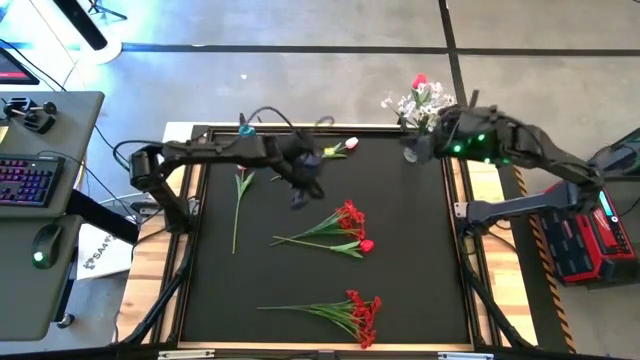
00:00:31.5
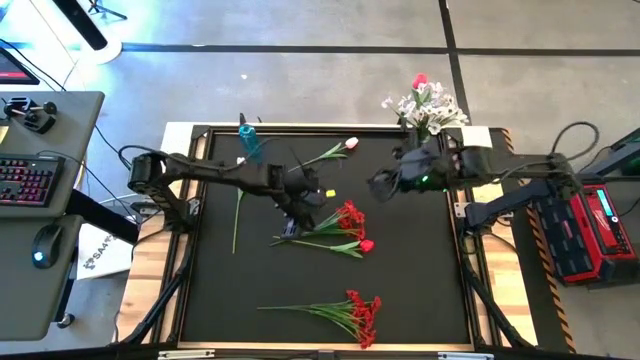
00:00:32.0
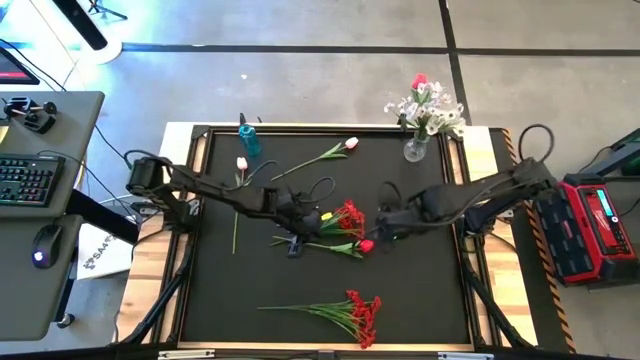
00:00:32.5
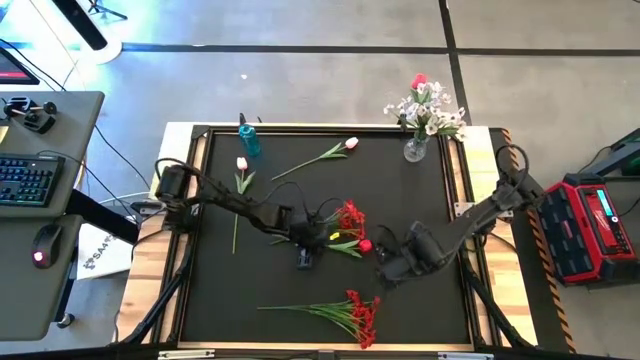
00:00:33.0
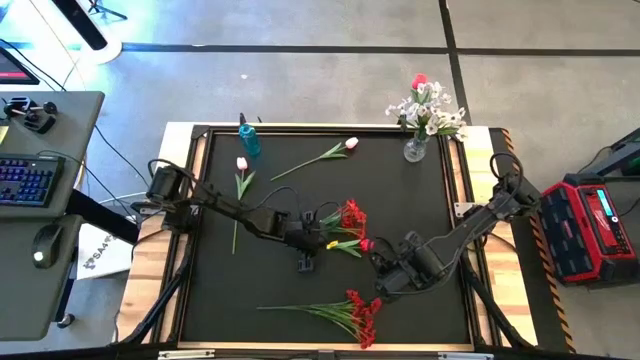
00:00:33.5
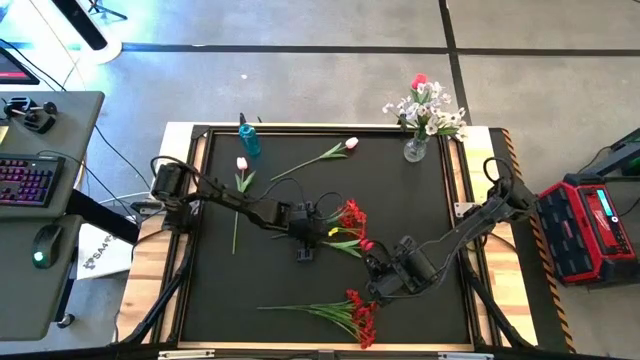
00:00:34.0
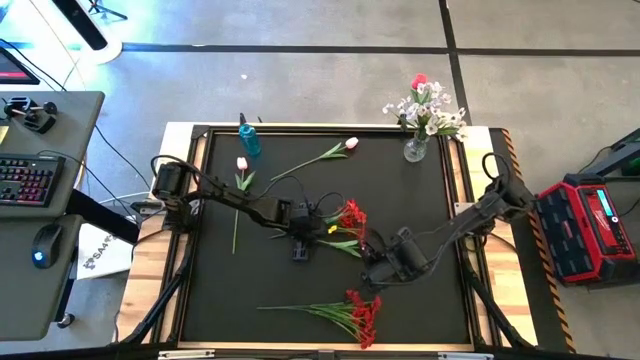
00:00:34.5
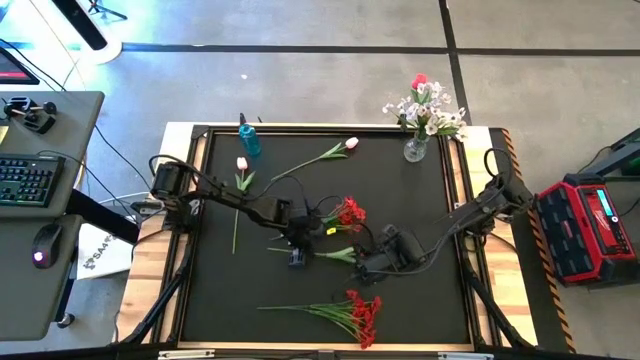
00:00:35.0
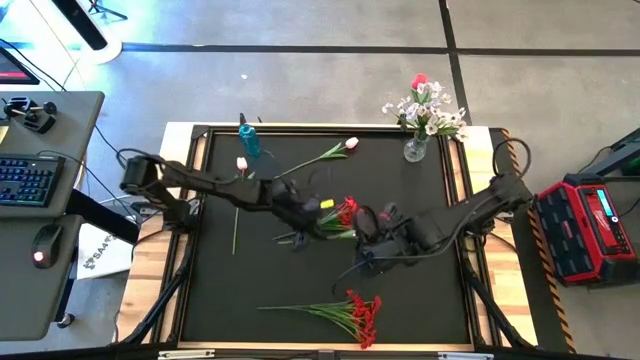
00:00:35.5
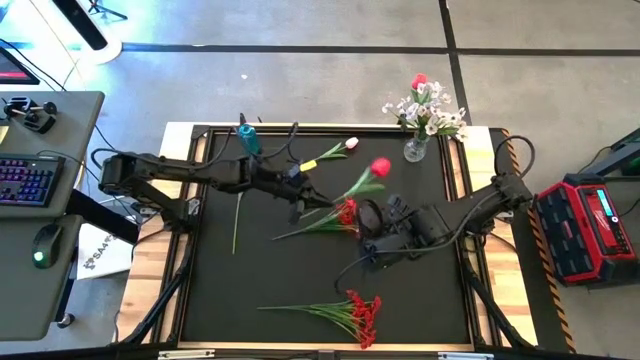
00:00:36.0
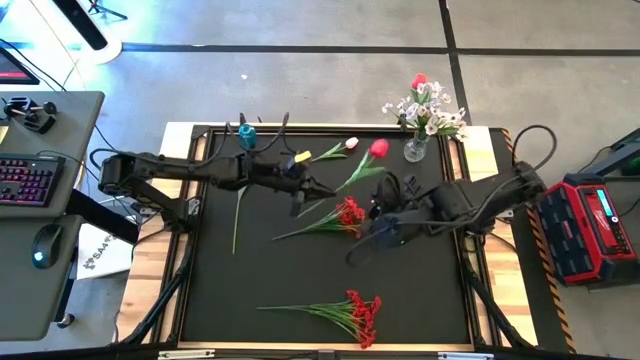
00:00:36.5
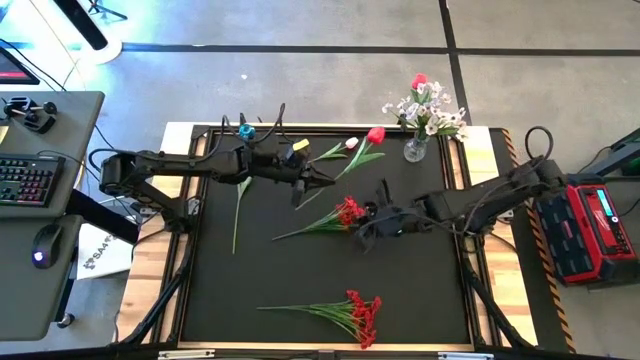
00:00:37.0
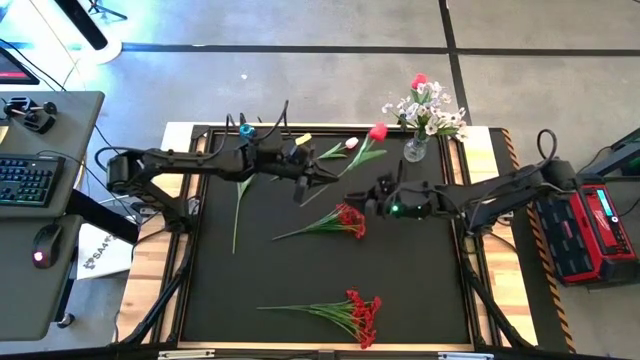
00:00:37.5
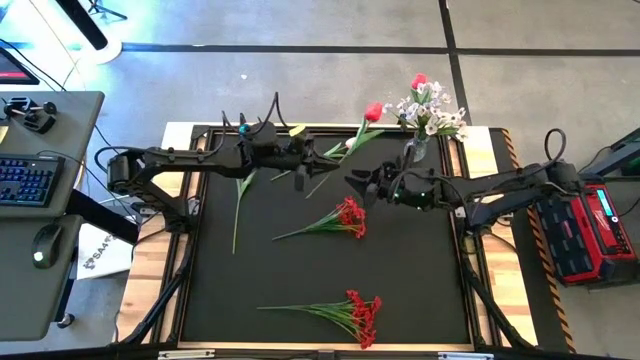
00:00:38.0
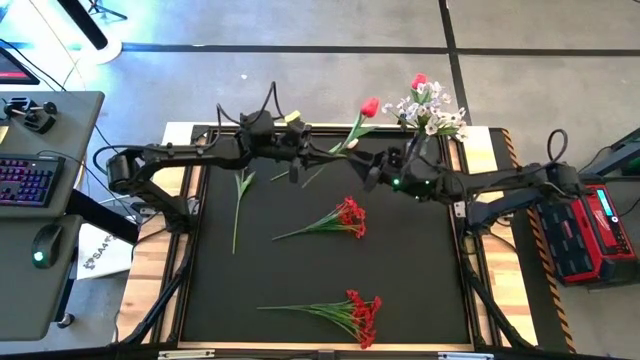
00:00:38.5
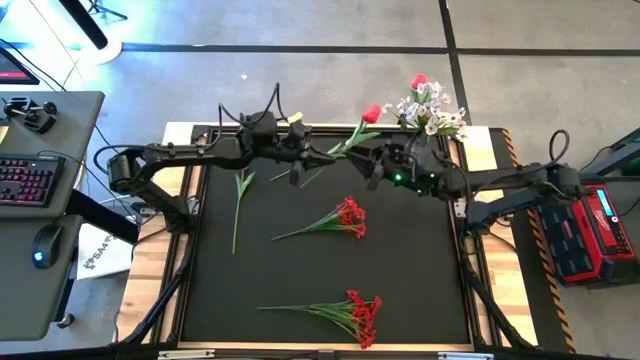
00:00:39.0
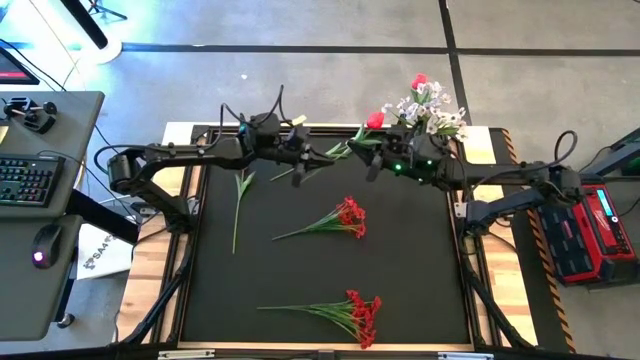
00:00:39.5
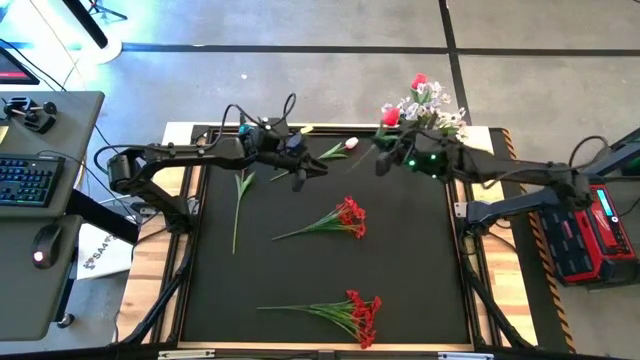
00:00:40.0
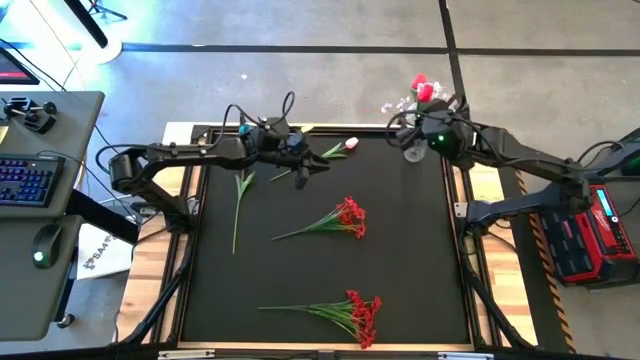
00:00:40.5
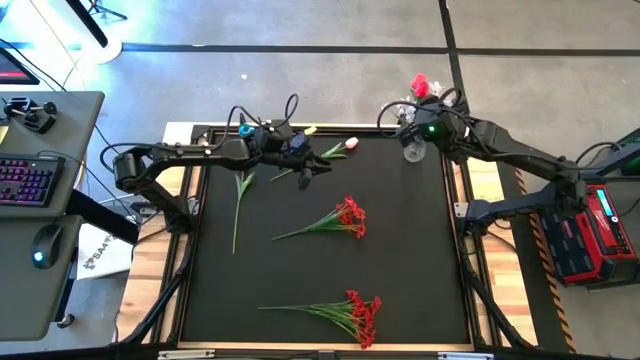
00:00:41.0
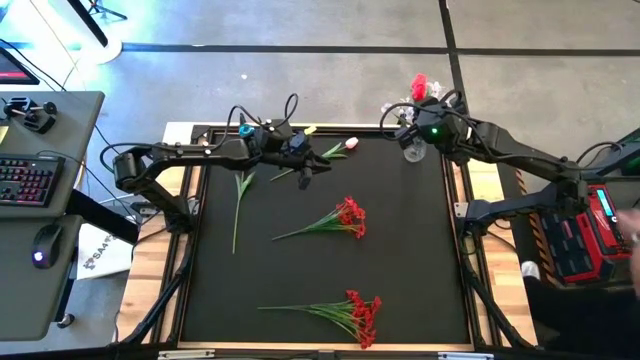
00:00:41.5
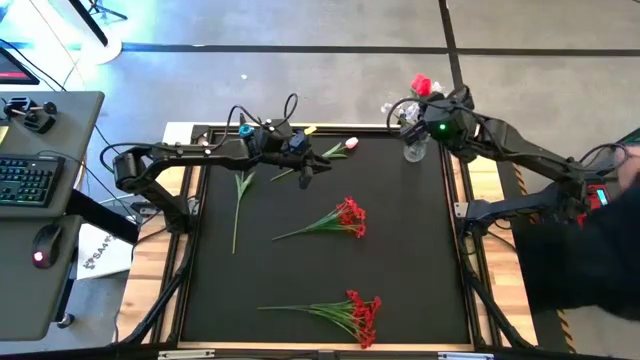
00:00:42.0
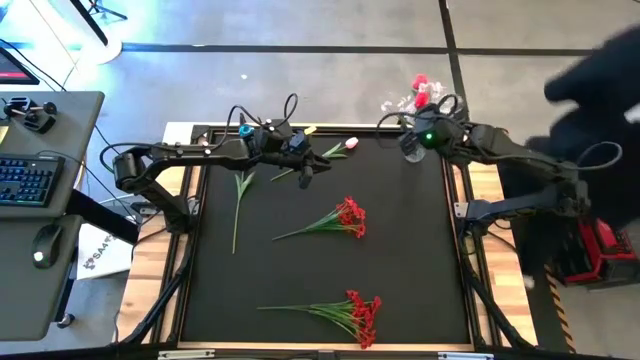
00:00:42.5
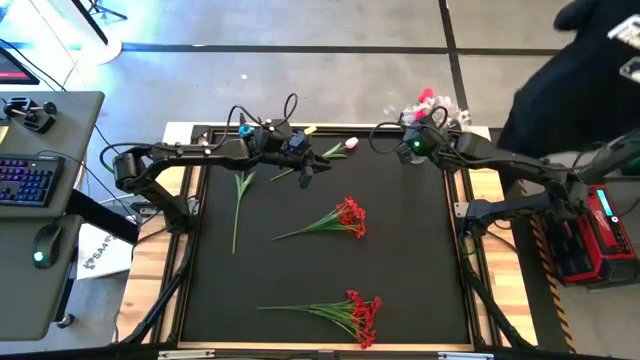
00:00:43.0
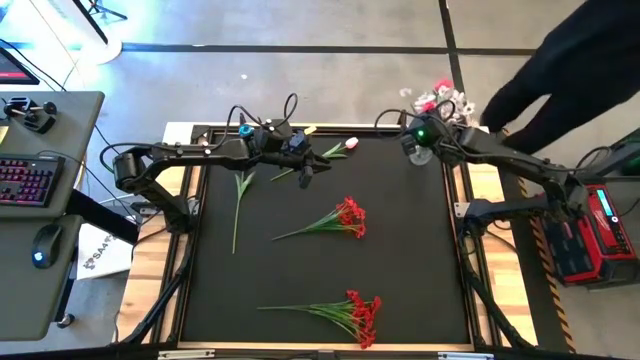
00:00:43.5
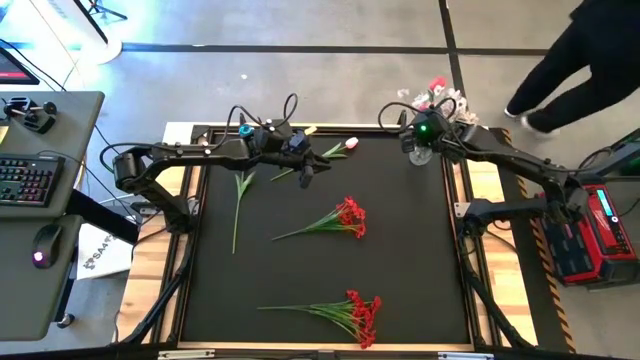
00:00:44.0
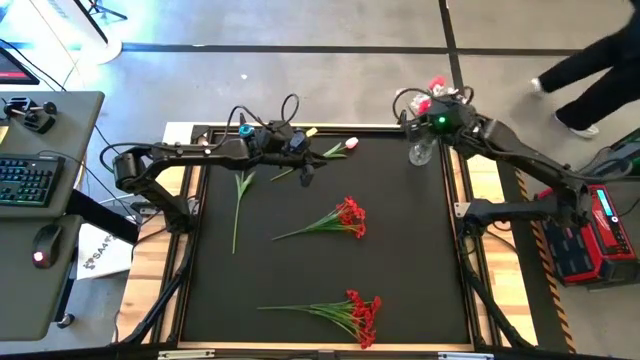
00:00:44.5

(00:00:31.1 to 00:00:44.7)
Task: Sort flowers into vase by color
Put the red tulip into the transparent vase

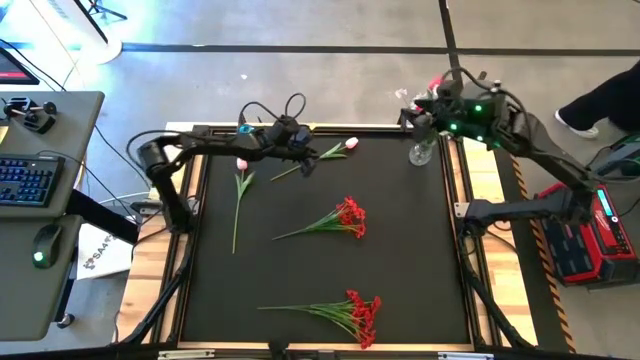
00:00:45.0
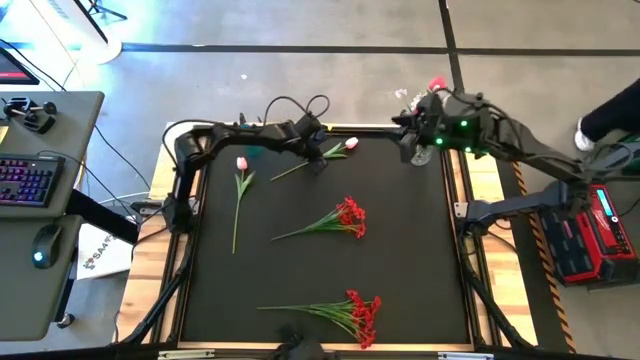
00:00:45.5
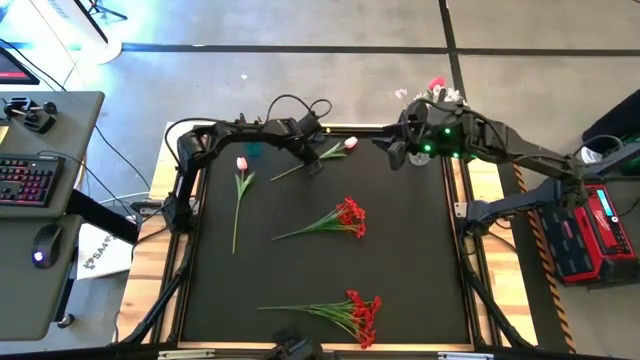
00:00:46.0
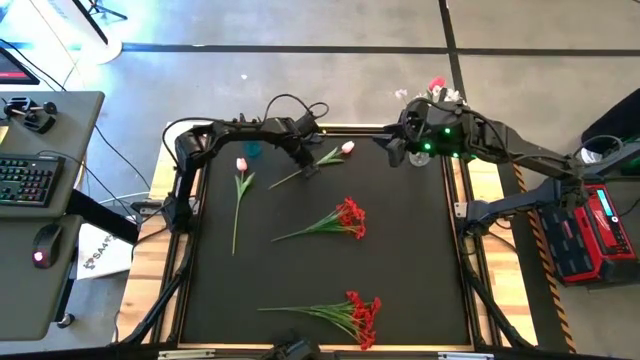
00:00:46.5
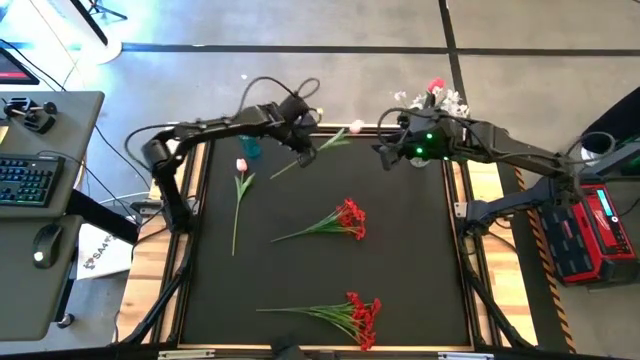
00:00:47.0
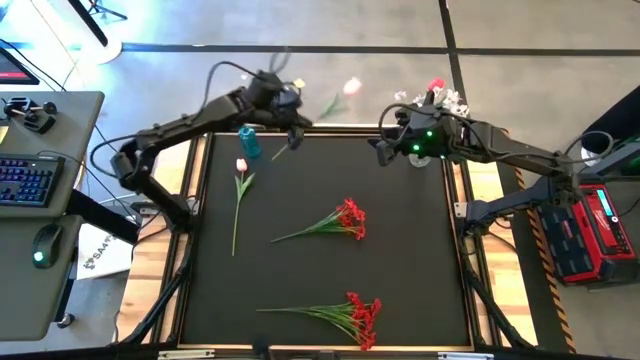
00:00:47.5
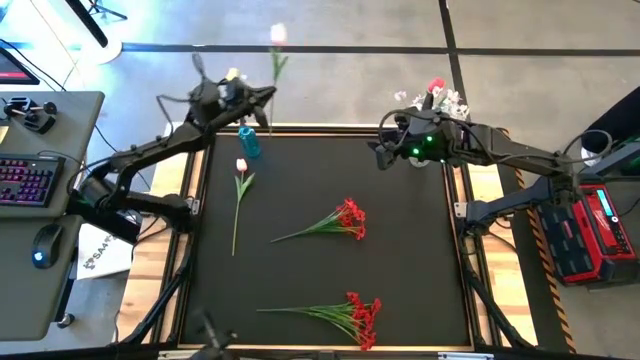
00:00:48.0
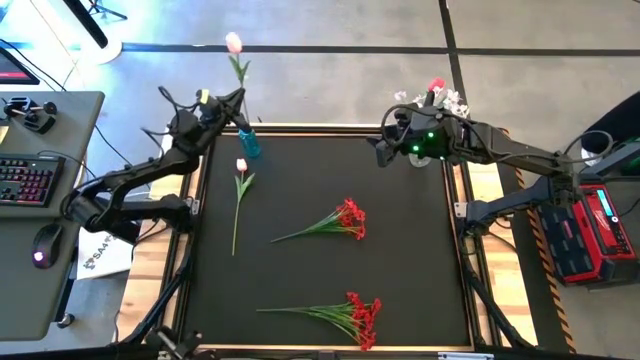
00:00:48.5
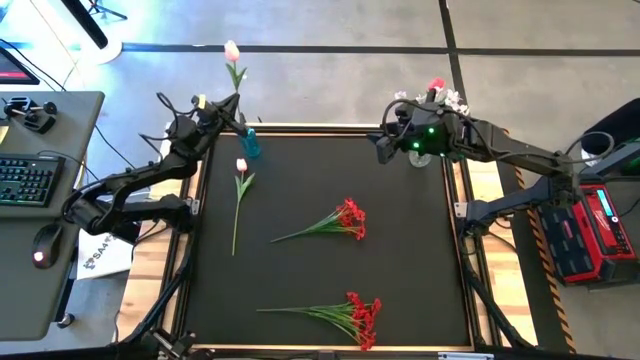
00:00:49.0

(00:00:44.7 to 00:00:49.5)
Put the right pink tulip into the blue vase
